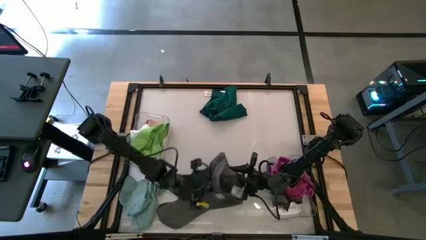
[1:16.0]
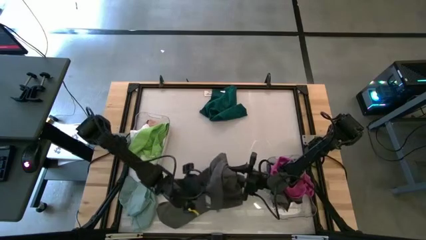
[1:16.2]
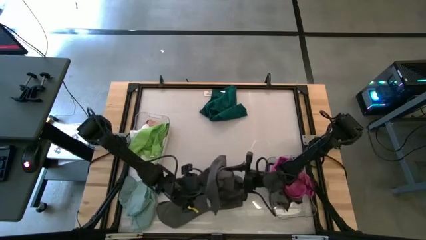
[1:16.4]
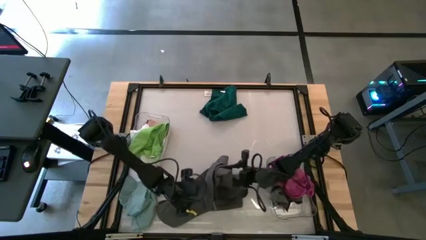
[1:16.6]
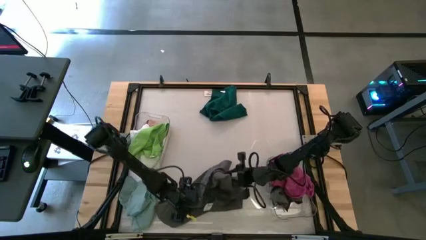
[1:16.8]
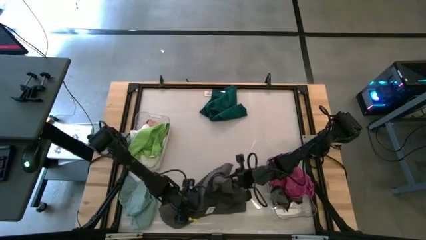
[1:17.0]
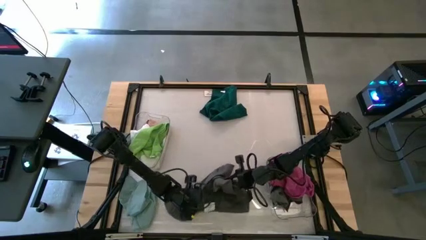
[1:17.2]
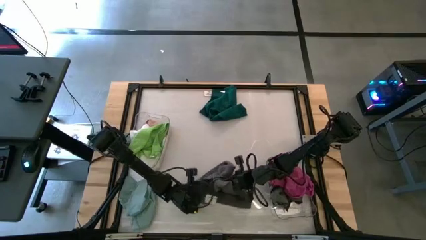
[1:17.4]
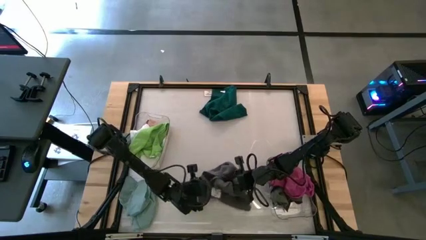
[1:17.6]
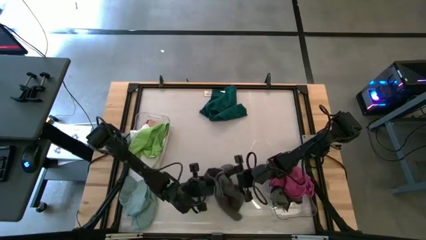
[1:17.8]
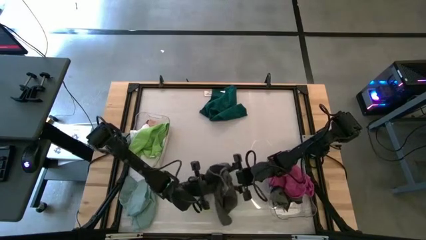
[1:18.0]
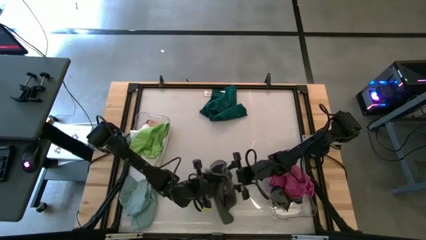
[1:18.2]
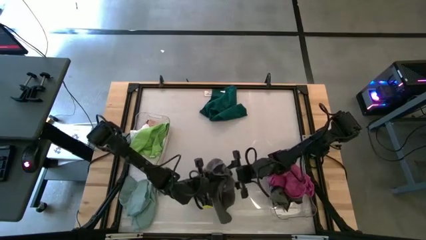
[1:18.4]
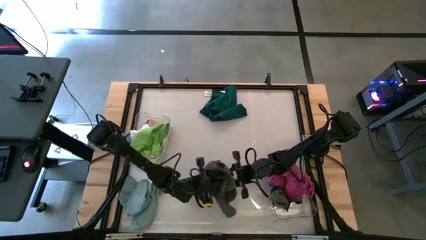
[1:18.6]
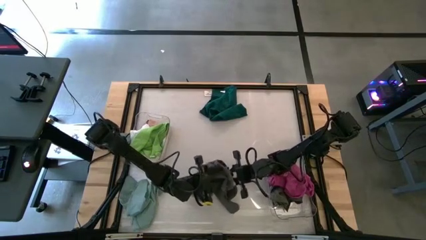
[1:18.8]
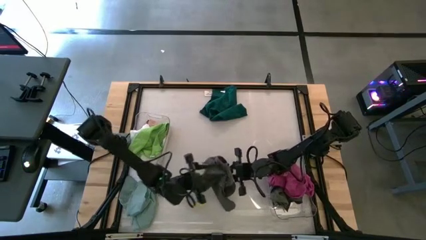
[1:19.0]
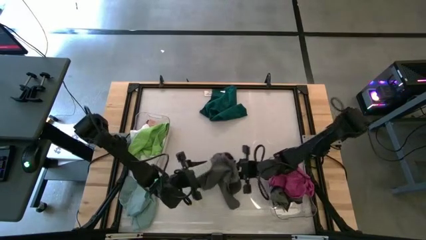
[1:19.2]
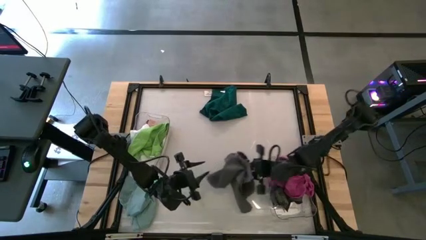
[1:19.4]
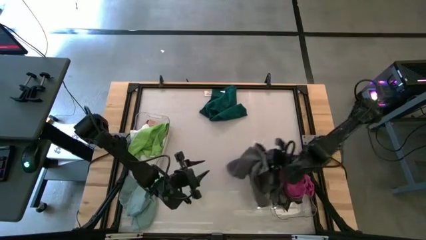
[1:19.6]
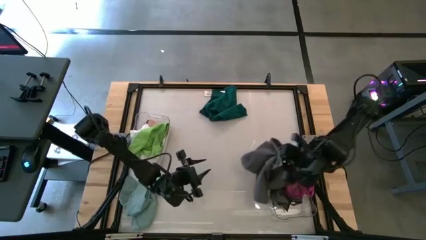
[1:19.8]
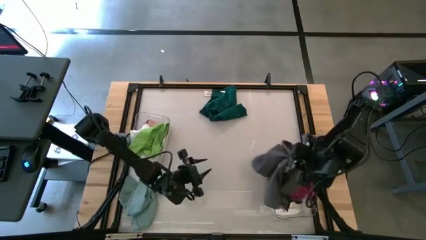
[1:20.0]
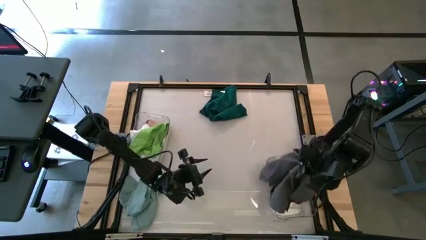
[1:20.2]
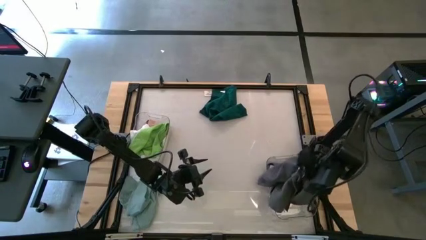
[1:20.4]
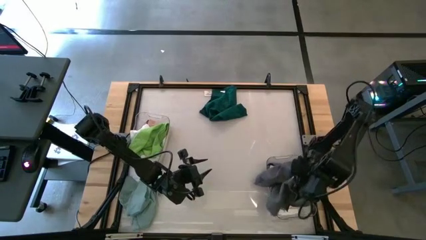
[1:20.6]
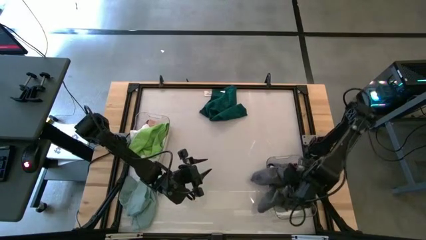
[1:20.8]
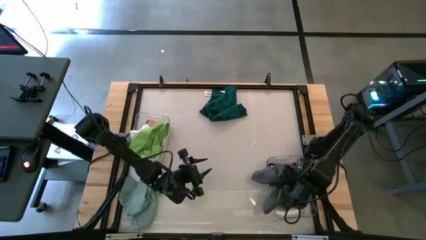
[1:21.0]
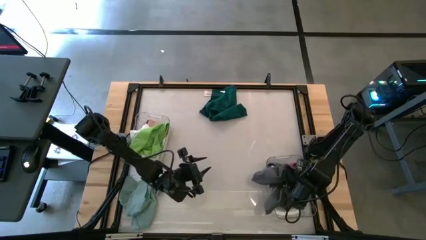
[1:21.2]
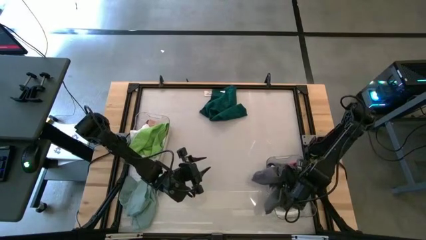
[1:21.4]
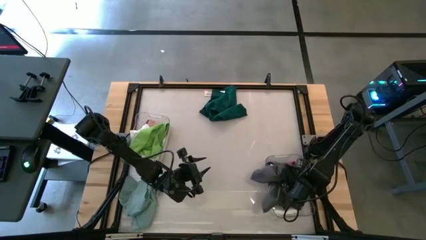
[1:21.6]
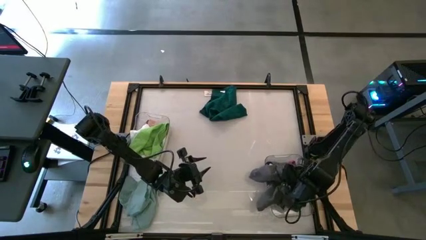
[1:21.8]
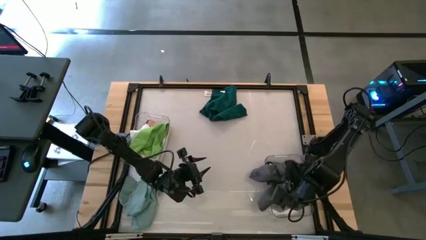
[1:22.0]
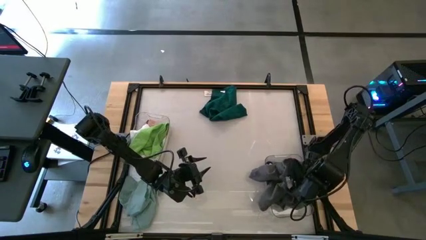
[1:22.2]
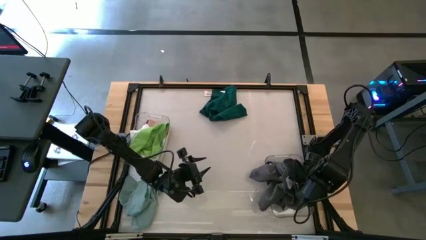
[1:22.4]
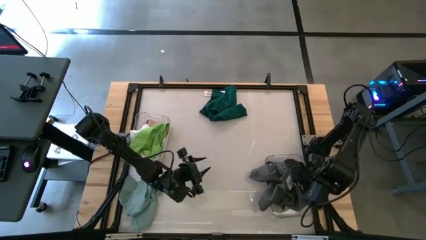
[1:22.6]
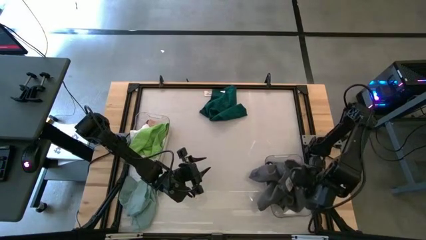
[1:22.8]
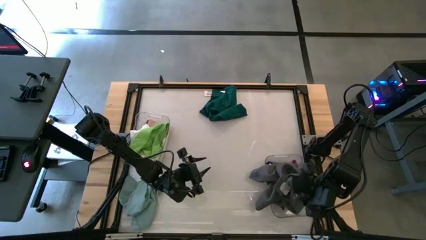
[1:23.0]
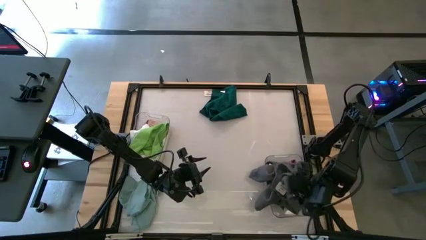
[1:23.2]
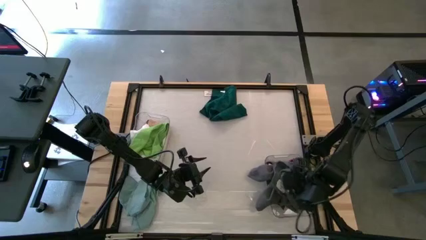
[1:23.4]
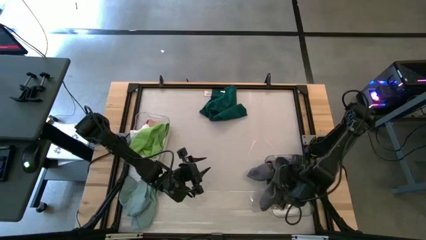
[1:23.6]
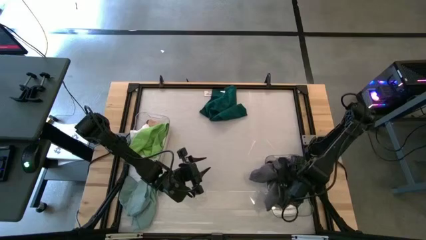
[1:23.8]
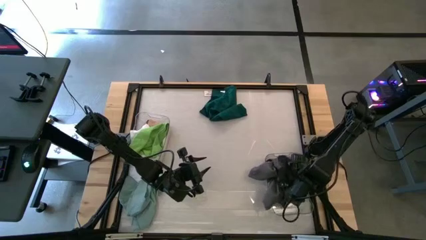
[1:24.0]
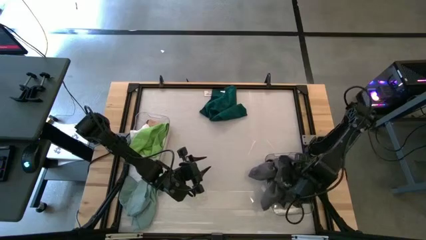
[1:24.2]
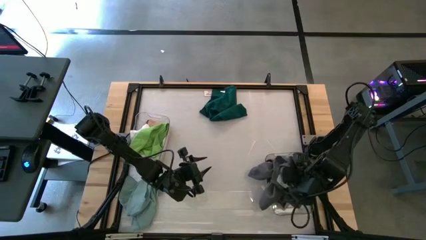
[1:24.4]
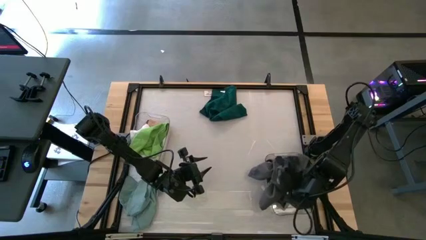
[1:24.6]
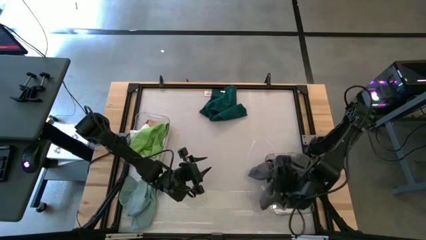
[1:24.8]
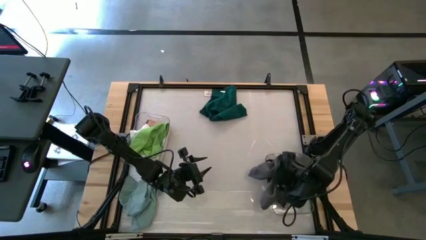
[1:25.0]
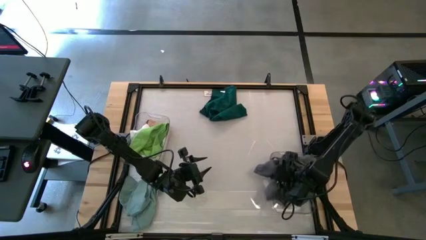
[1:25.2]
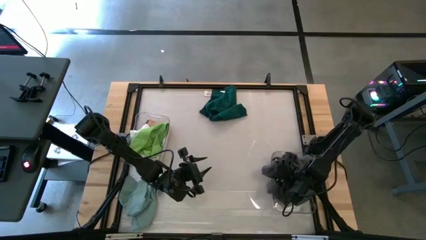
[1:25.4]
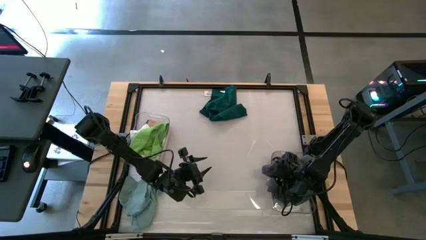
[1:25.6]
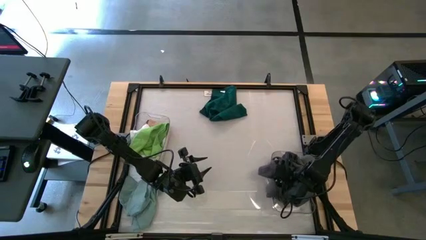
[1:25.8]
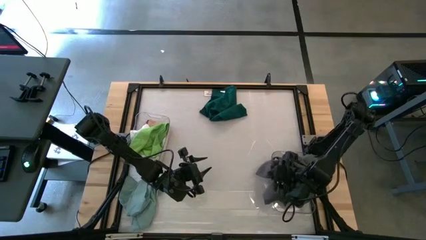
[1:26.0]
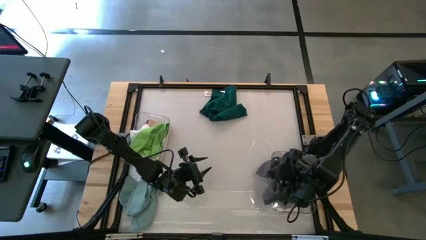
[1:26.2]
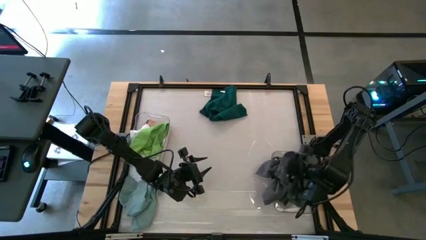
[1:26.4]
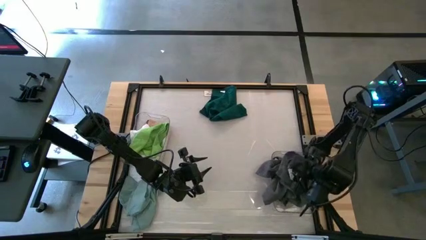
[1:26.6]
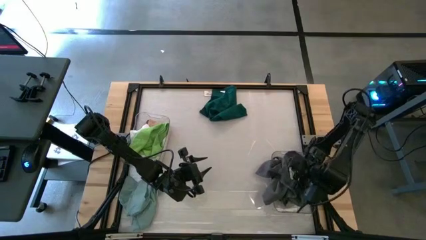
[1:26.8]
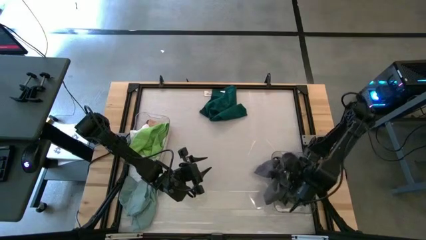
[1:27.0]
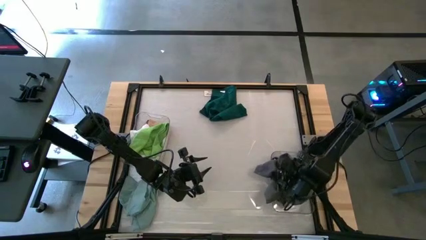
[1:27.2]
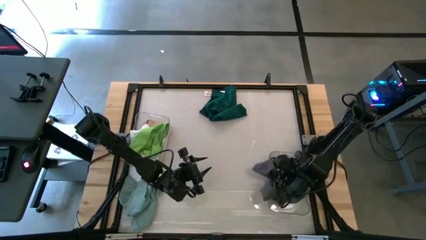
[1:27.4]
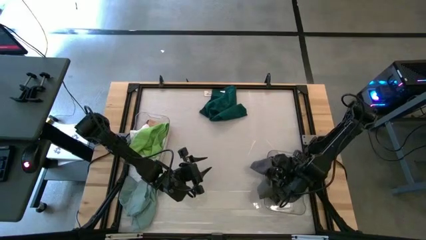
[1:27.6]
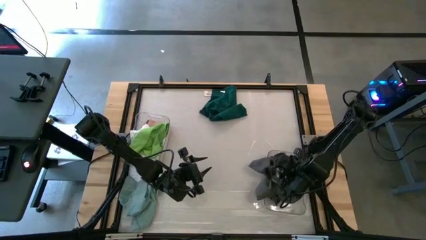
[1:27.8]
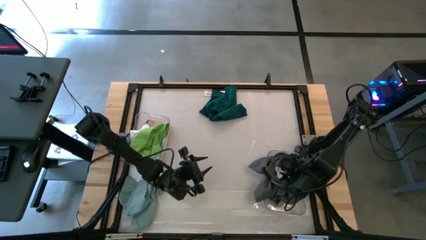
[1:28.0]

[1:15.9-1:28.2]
Task: Sort towels by color in basket
Put the gray towel into the right transparent bin
